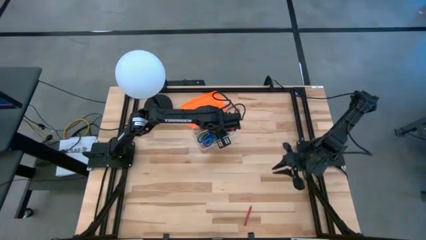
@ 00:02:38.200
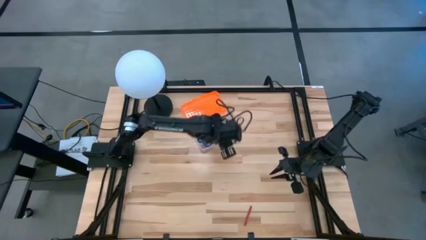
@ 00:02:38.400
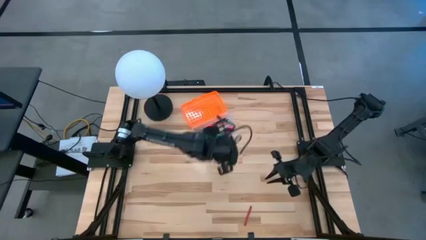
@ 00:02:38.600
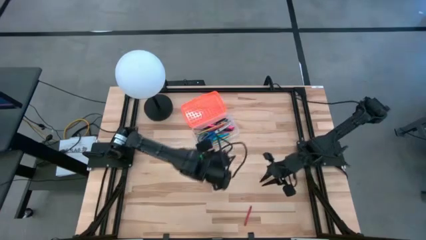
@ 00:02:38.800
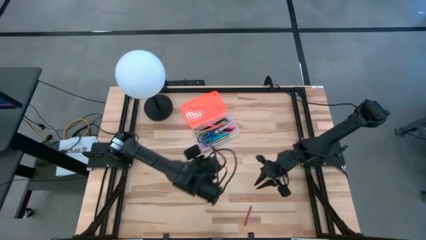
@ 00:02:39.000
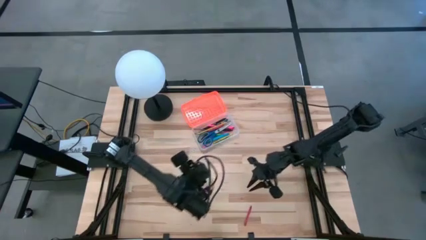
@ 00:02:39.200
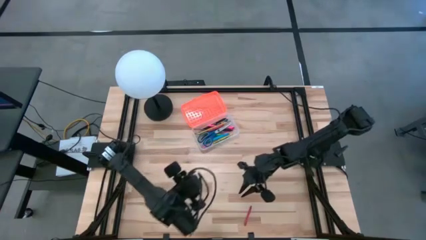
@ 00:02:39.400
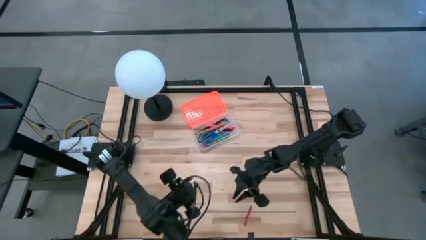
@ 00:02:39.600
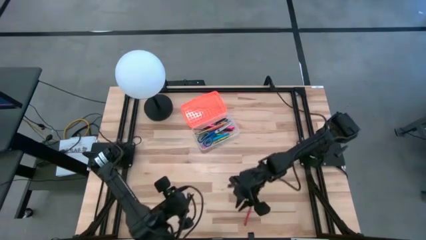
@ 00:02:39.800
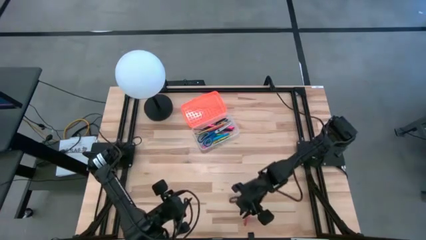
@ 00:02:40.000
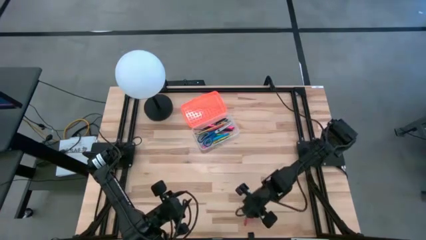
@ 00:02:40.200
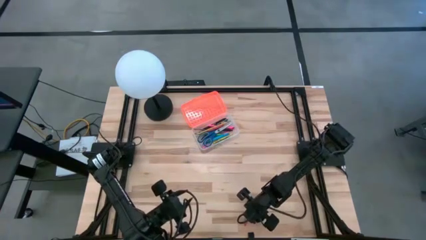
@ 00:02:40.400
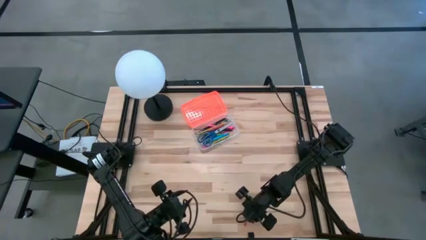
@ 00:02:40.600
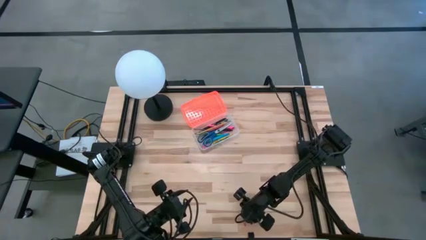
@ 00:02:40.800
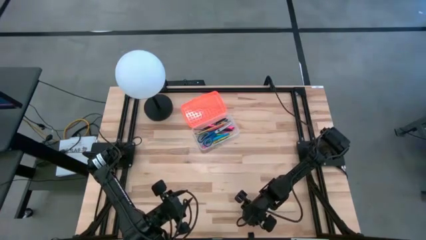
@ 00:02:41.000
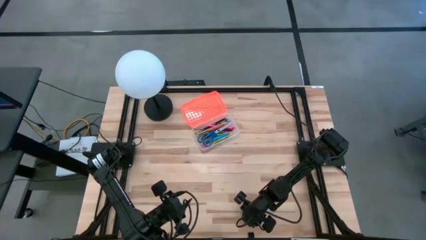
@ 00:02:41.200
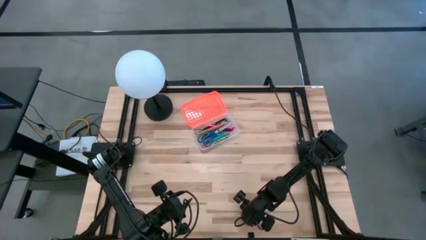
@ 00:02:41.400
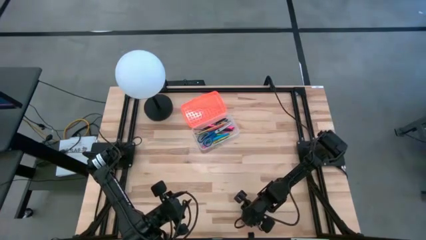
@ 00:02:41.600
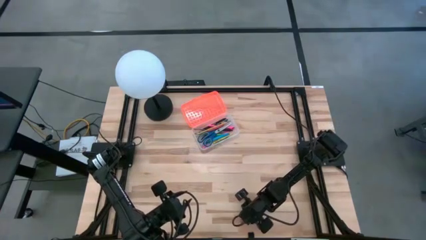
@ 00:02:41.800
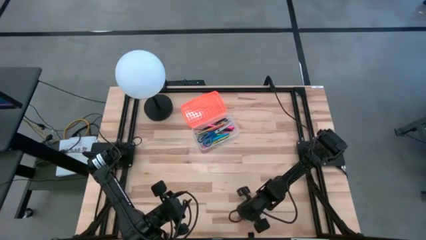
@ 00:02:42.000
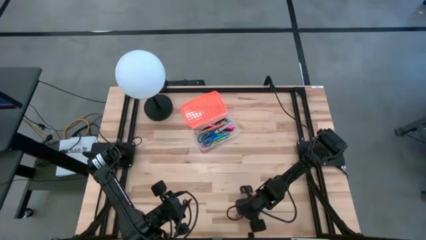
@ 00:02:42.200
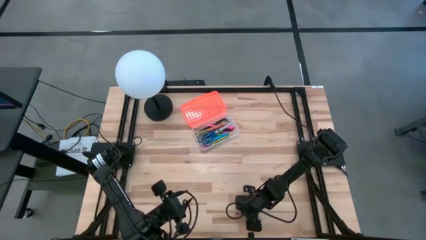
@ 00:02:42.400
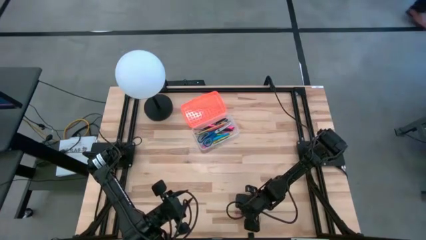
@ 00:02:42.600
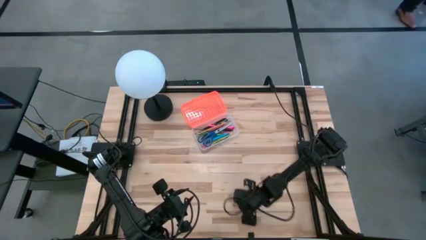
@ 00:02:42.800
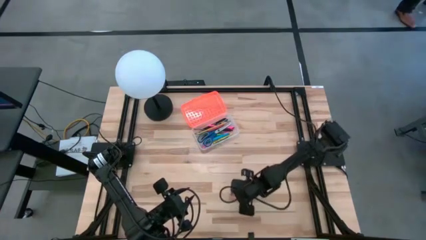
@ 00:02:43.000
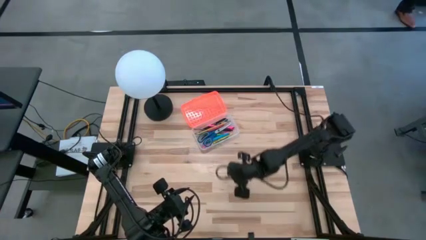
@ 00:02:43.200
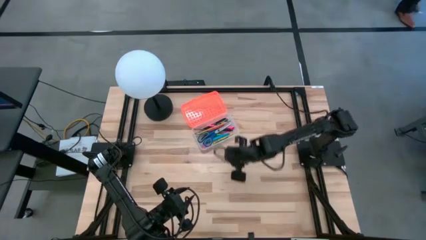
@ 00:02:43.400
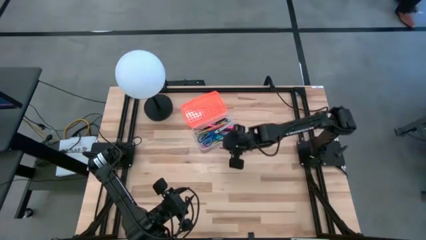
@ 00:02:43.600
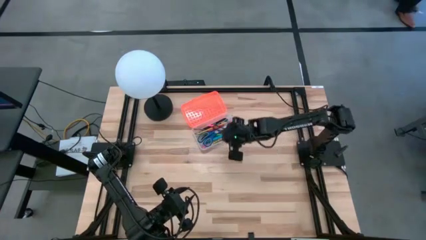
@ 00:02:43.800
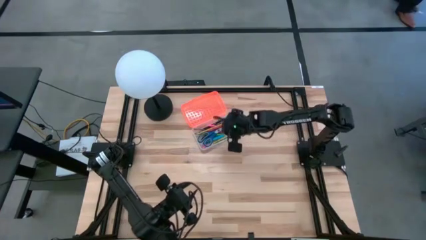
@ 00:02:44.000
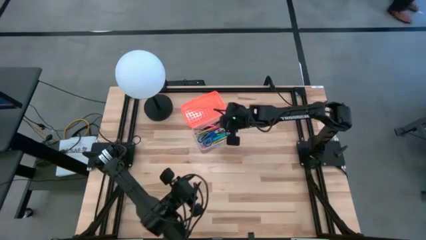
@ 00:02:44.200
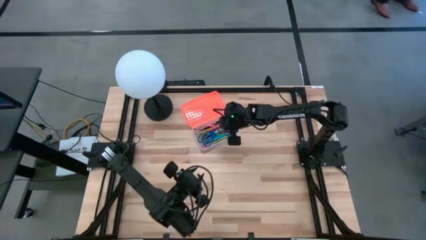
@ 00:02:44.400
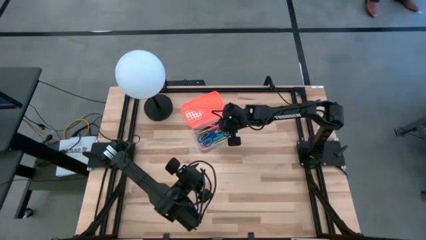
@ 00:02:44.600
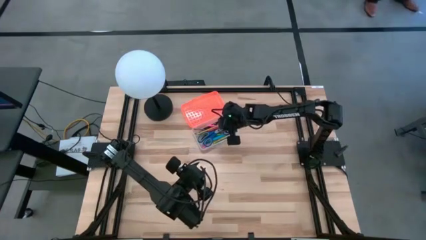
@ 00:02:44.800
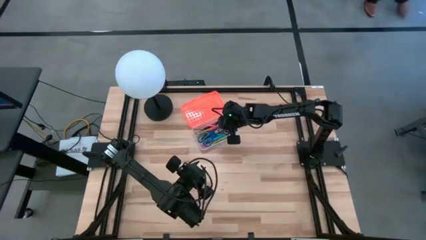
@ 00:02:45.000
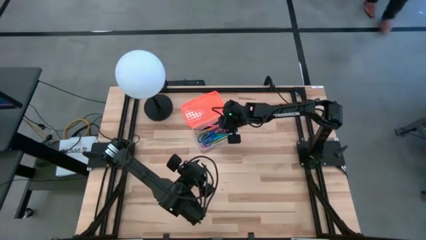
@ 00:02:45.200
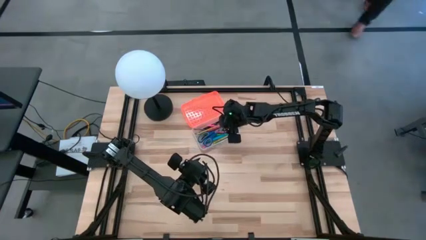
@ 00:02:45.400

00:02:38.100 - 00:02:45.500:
Task: Pick & place school supplies into a supply box
Put the red crayon into the supply box

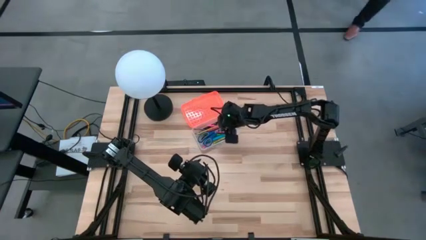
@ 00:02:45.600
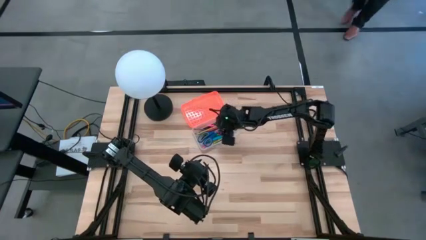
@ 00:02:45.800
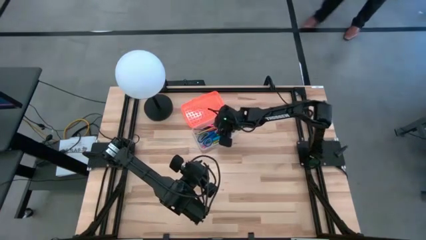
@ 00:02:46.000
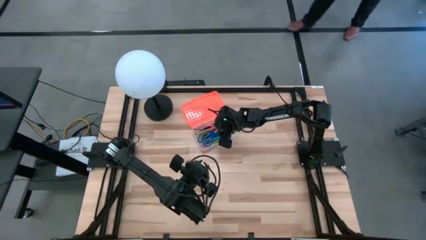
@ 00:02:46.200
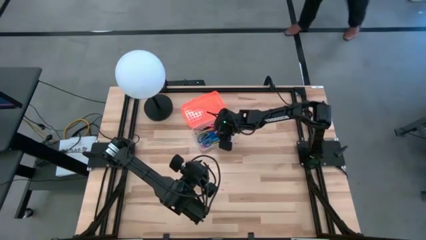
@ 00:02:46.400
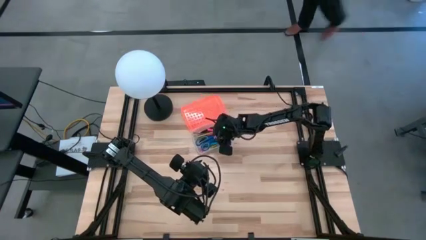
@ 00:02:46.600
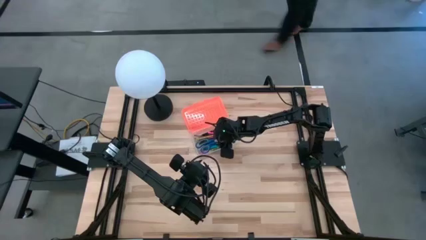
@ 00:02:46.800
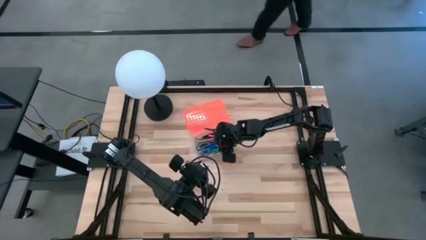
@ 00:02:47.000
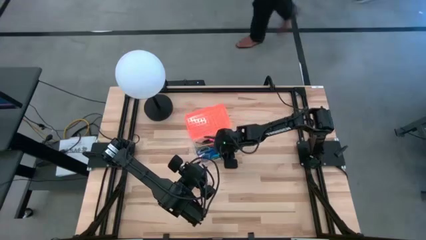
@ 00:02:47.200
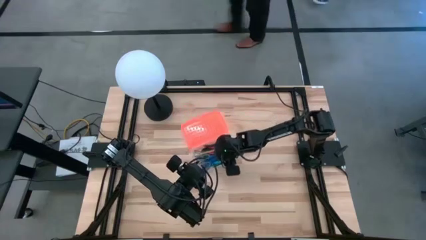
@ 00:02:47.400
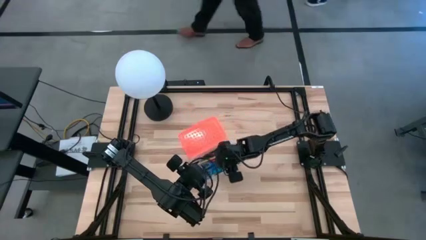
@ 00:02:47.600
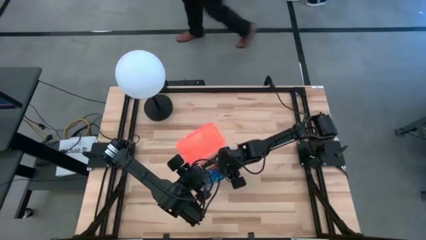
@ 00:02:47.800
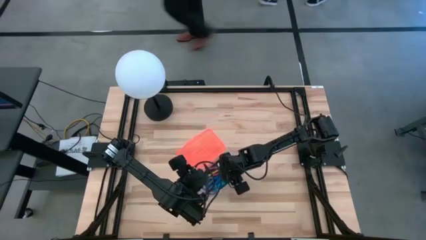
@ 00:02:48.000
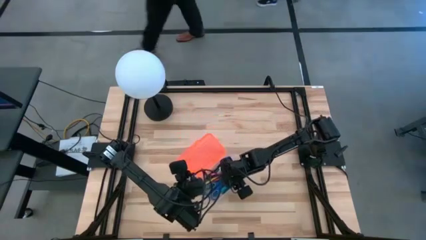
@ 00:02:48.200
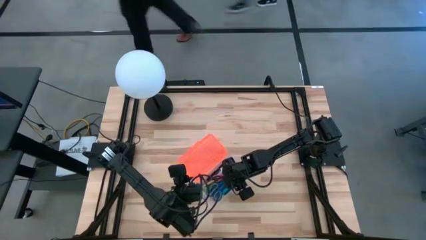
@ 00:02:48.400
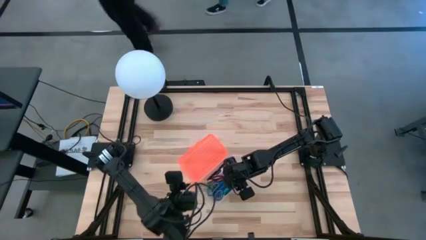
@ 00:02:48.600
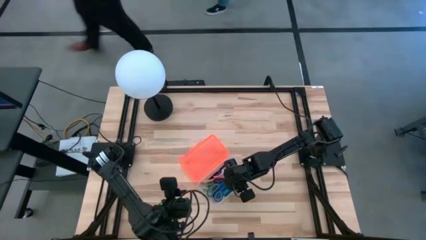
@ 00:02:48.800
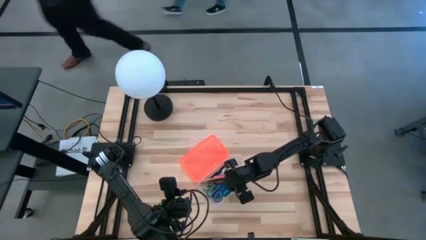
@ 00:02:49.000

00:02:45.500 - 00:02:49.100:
Move the supply box from top to center of the table
